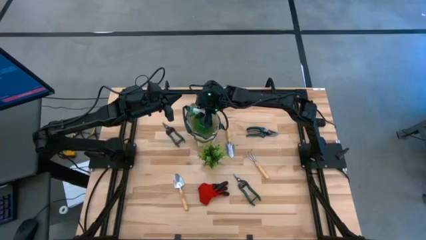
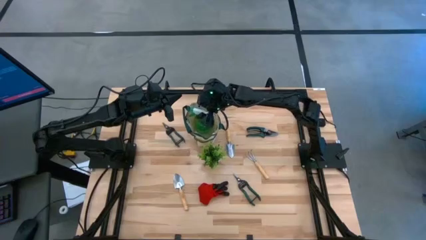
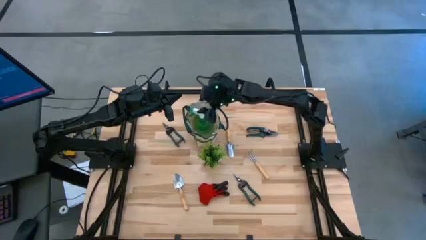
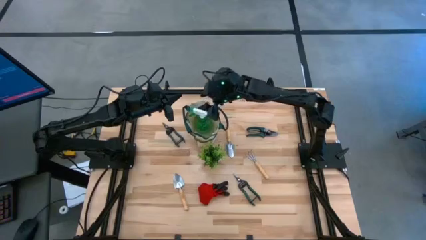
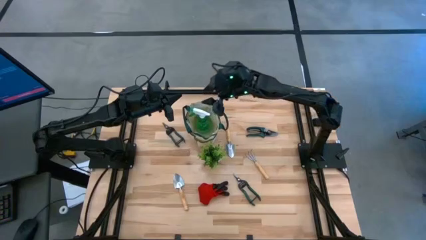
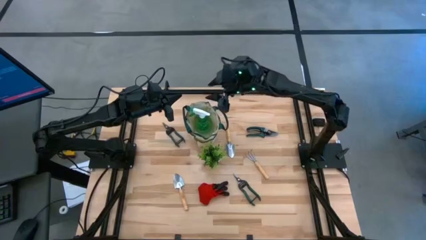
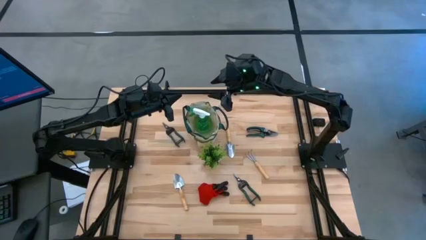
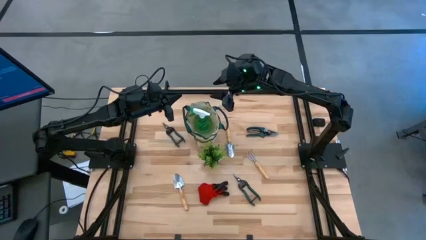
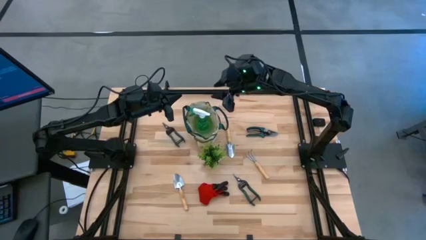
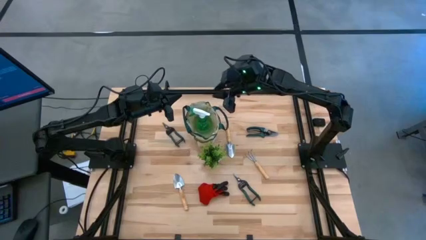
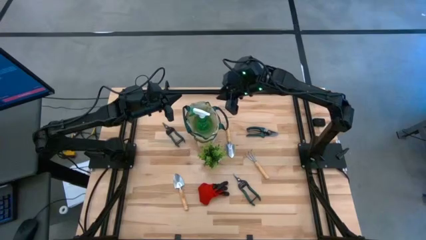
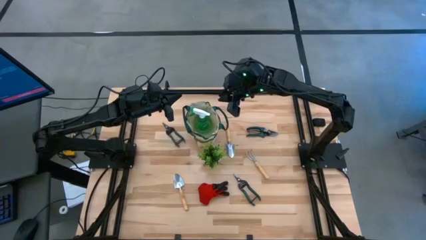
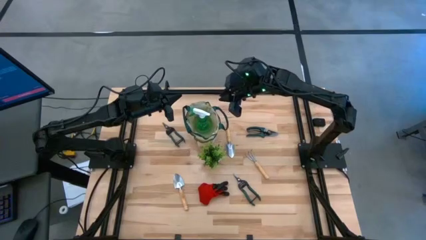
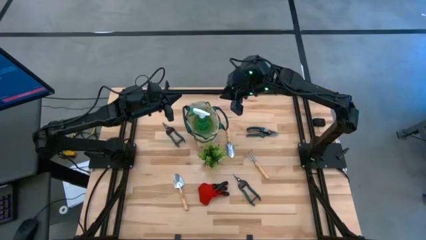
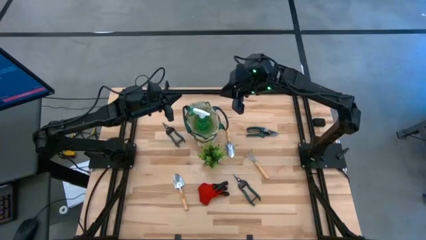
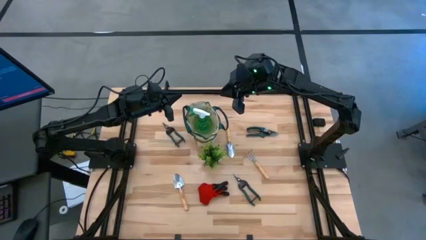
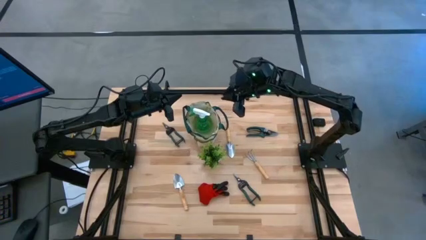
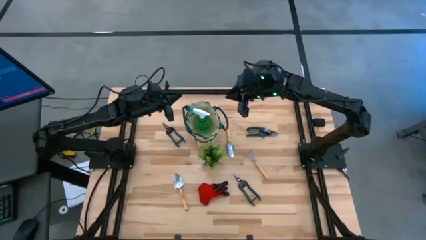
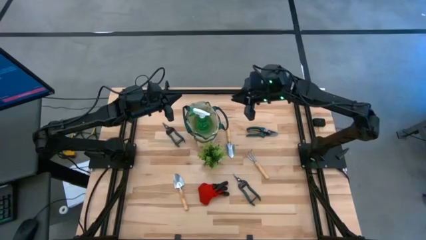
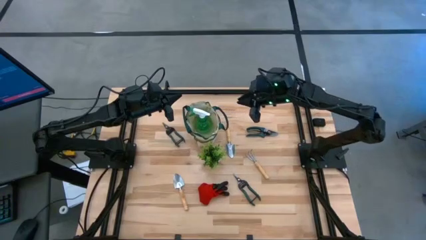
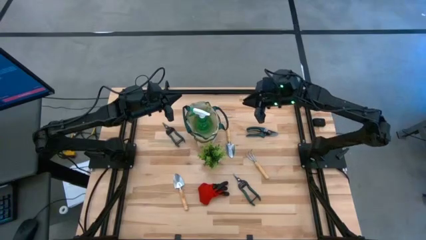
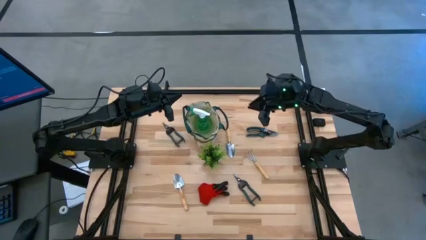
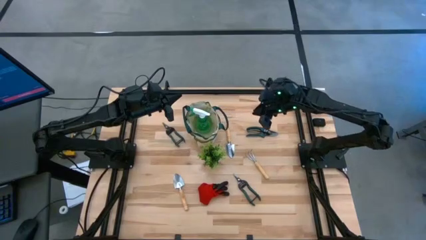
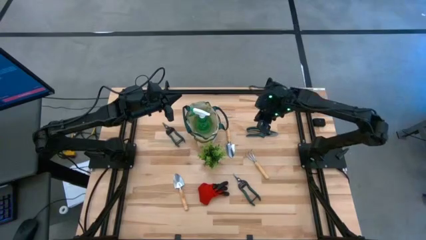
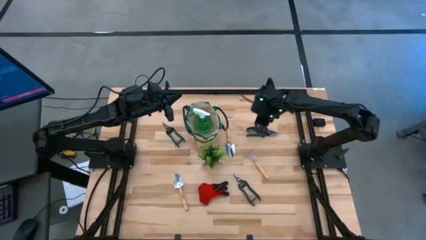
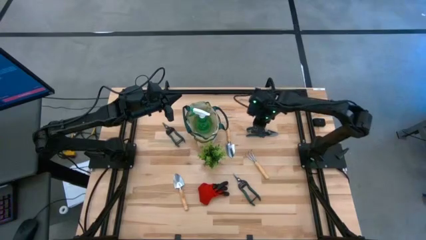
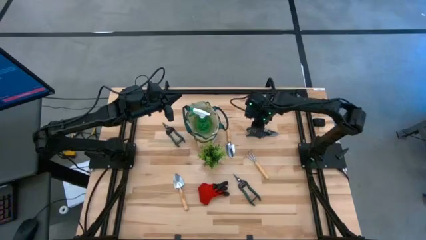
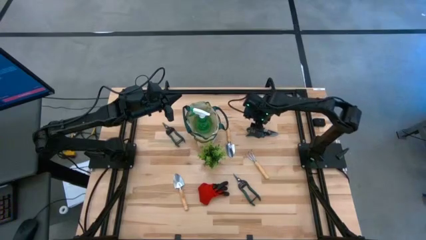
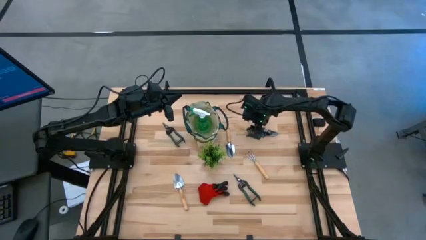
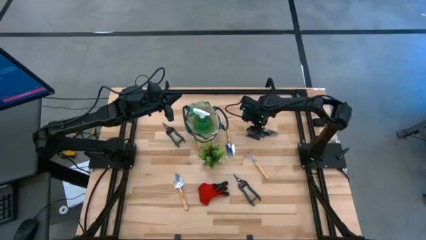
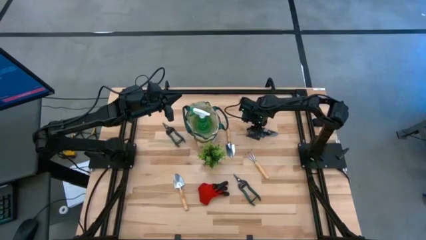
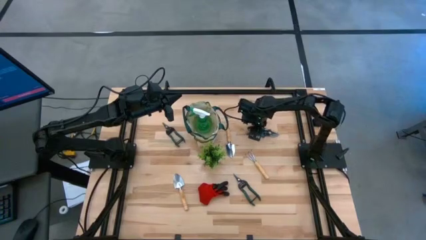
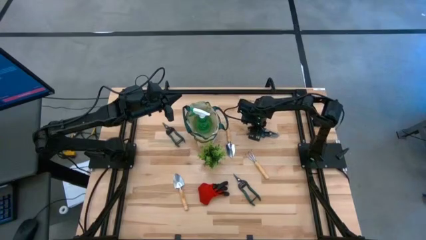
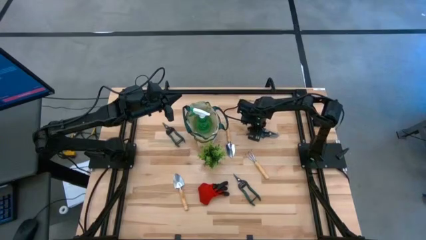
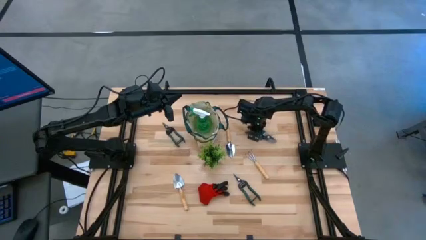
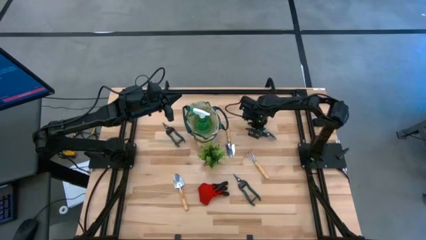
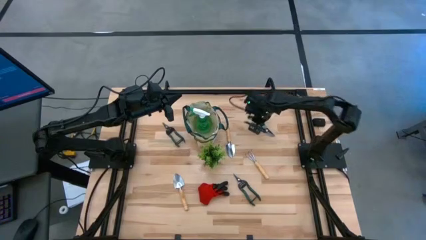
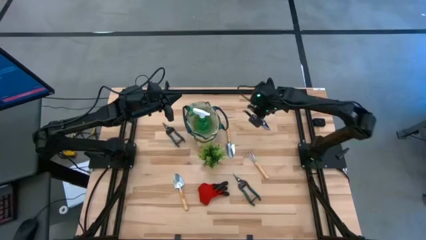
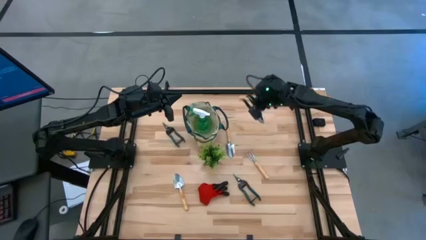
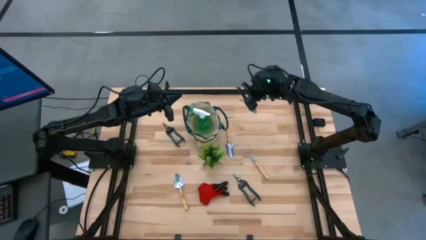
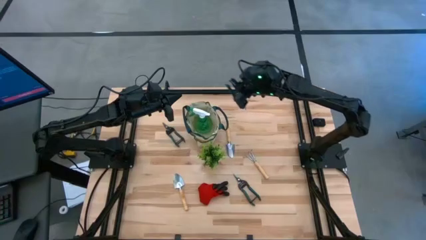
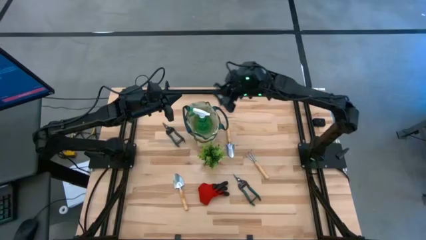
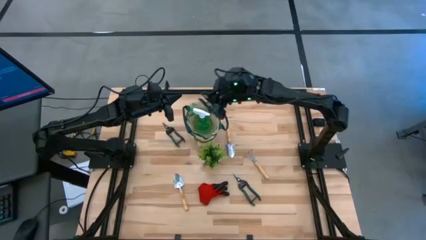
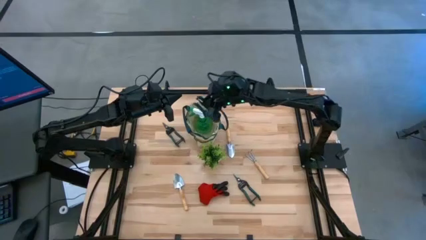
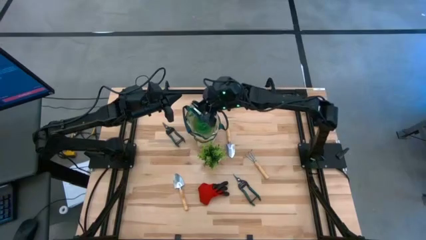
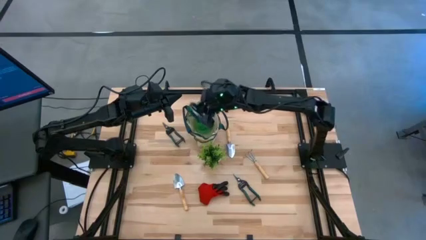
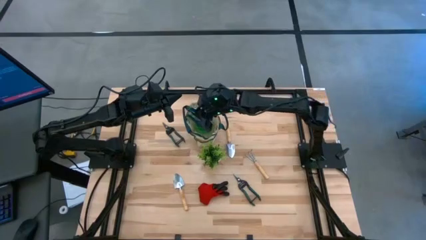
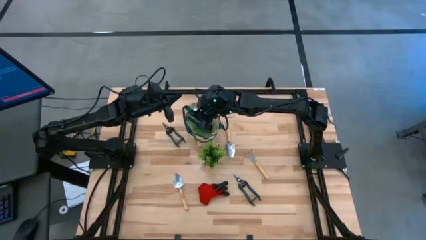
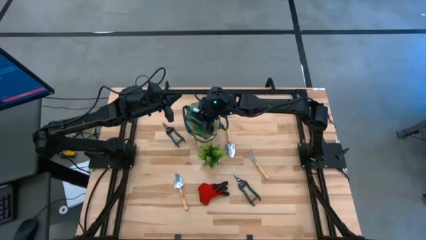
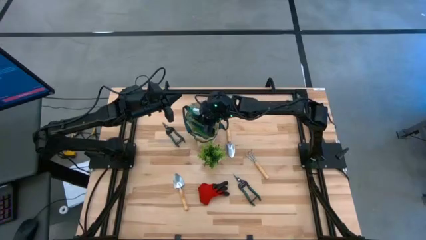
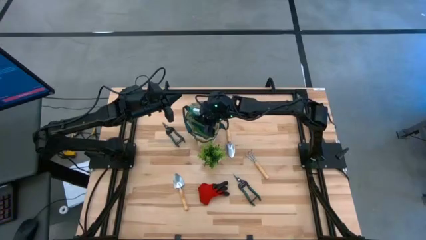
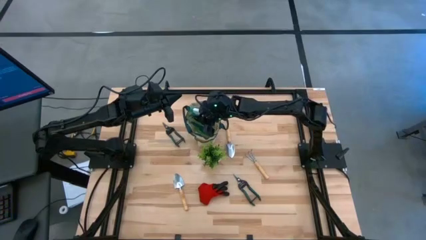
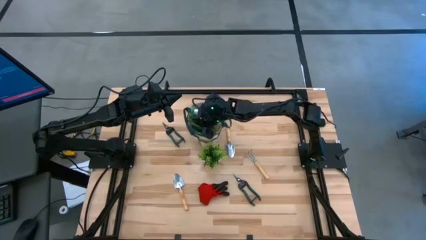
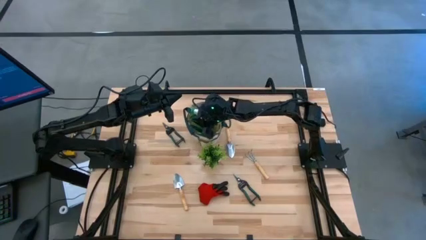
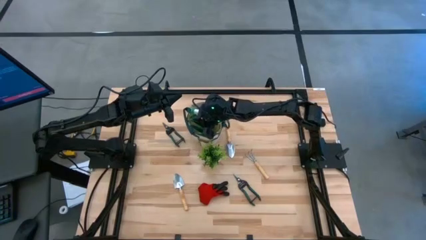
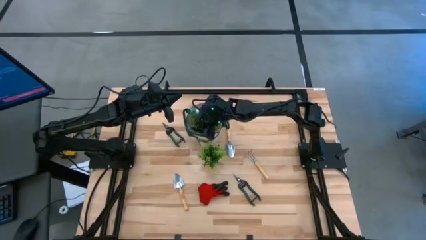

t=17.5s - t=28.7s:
Task: Pick & Place Garden tools in Gardening bag
Put the green shear scissors into the brown gardening bag

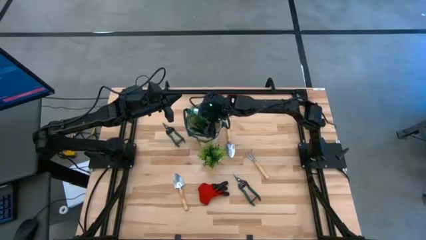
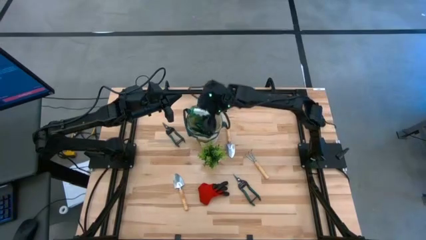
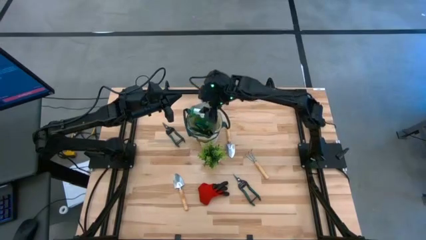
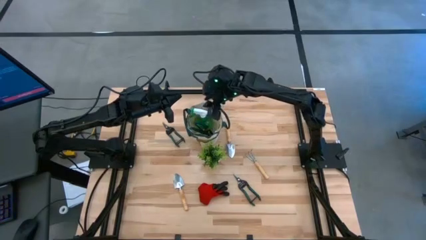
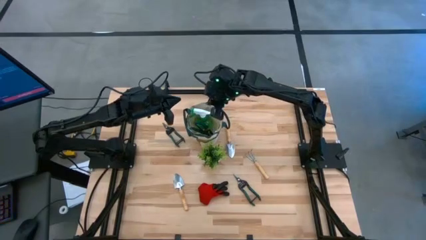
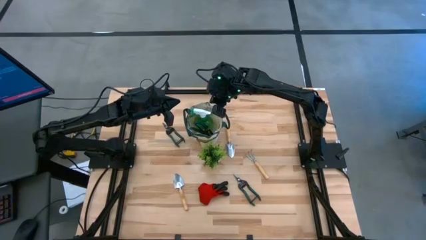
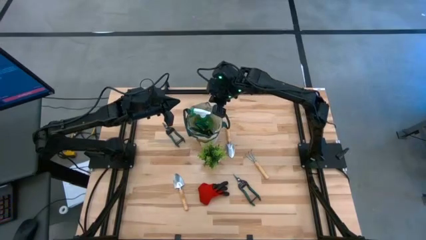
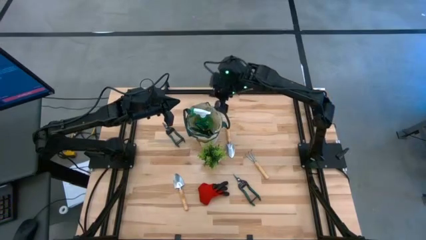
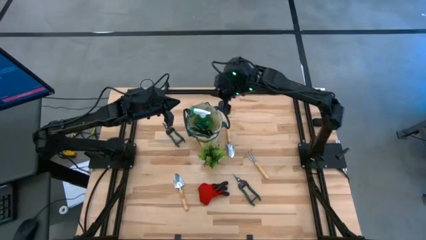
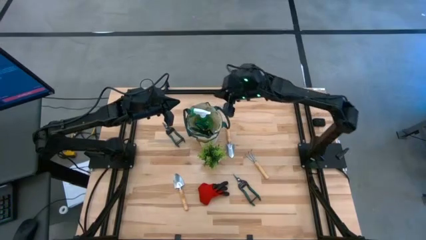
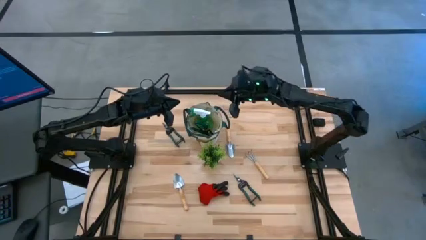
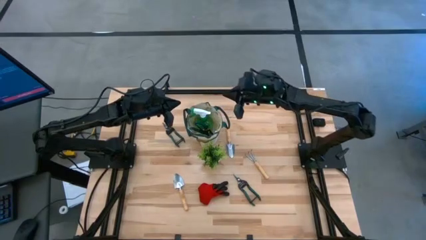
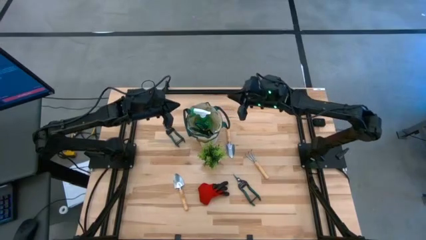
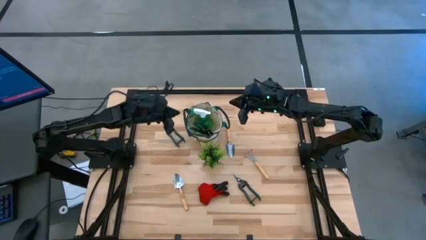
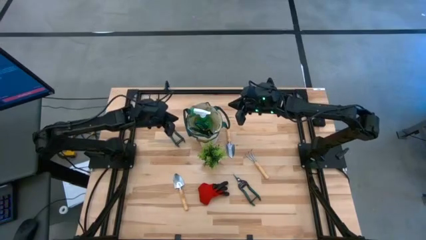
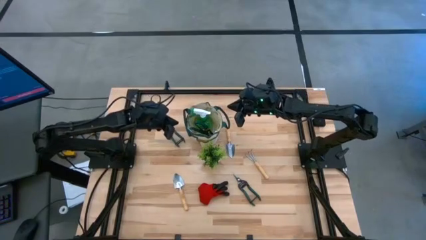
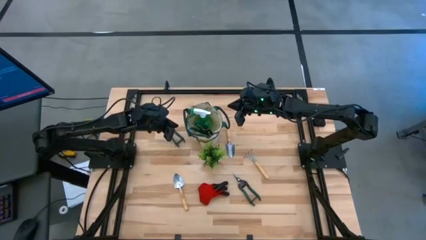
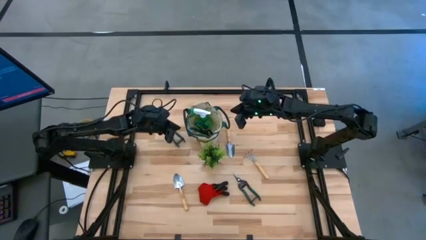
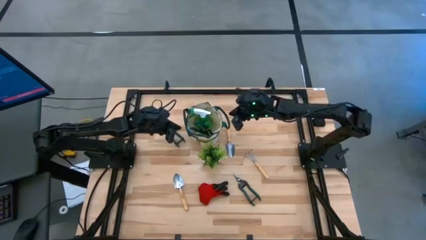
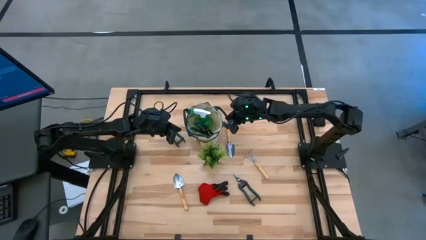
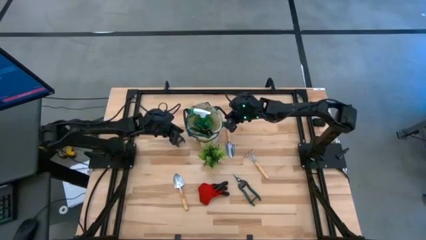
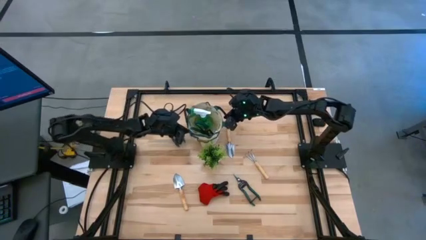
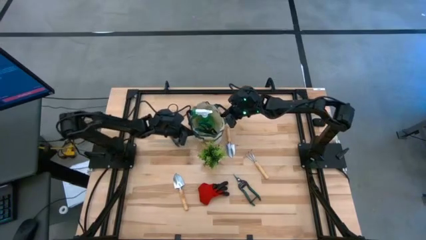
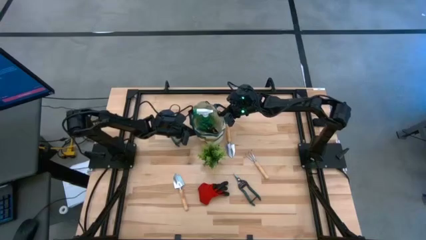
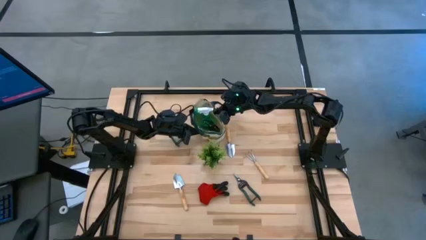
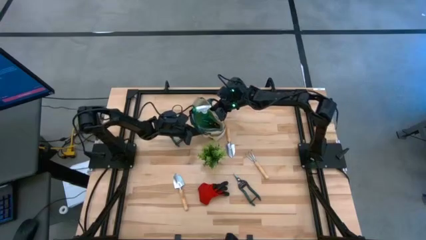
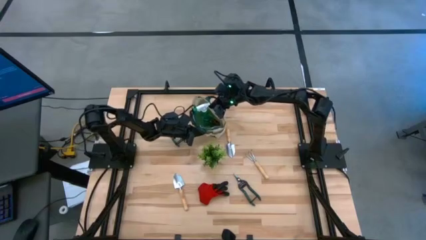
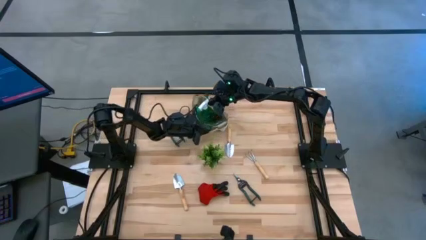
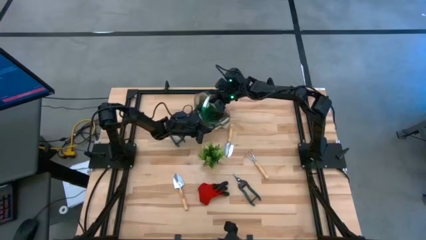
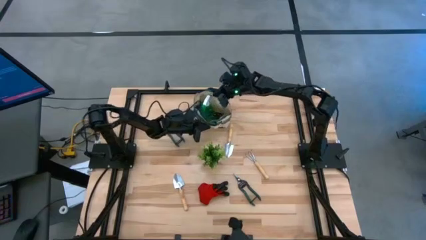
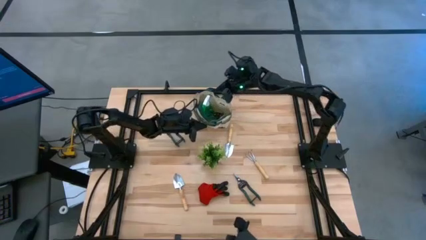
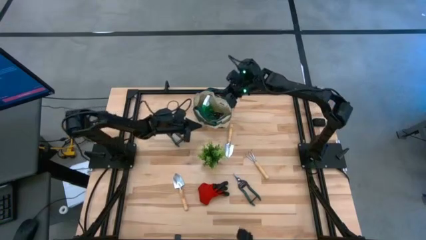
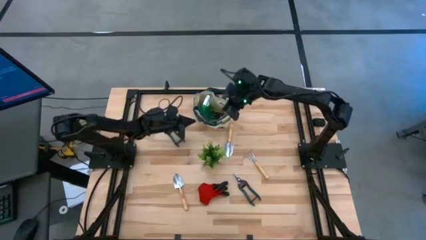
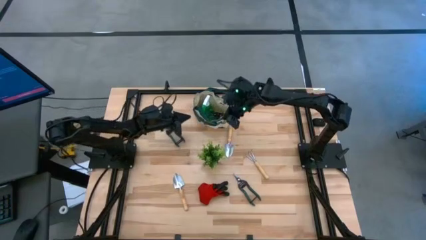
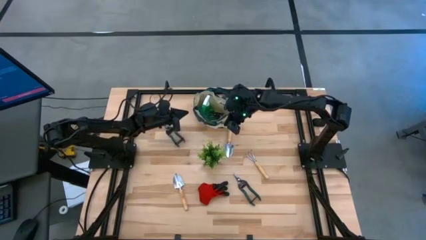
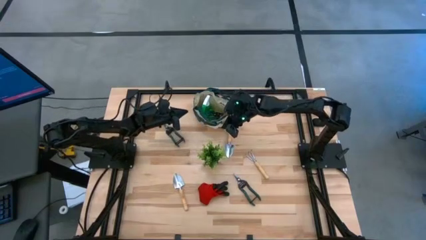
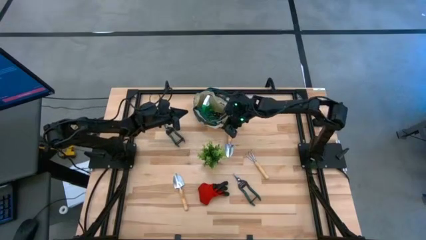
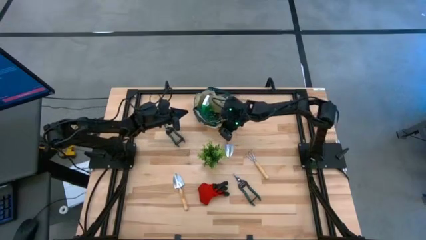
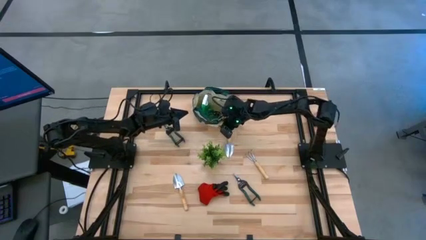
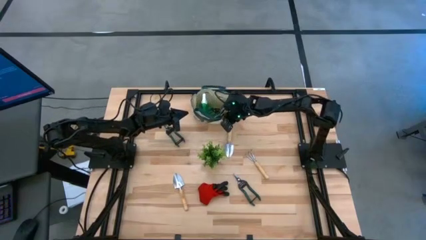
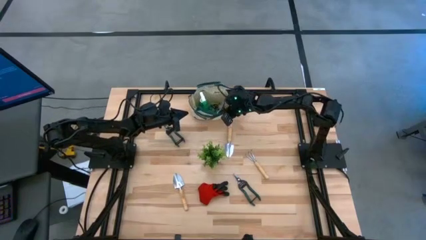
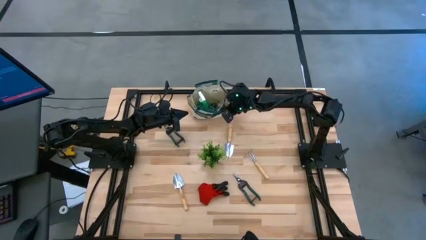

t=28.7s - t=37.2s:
Adjust the brown gardening bag
